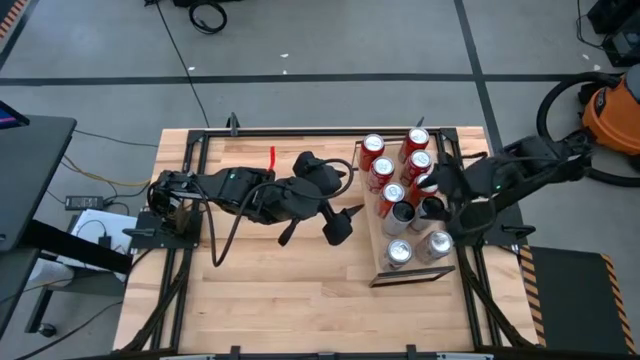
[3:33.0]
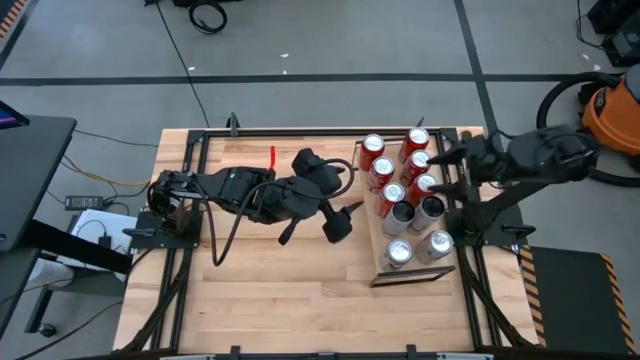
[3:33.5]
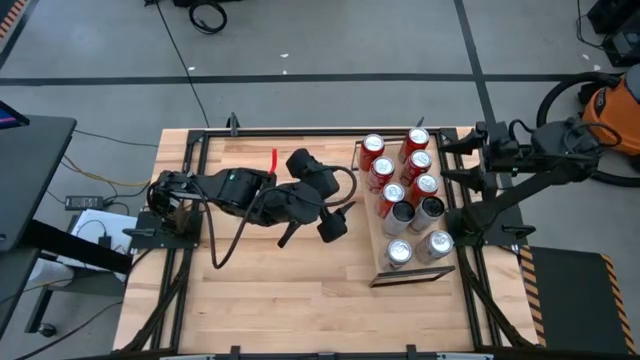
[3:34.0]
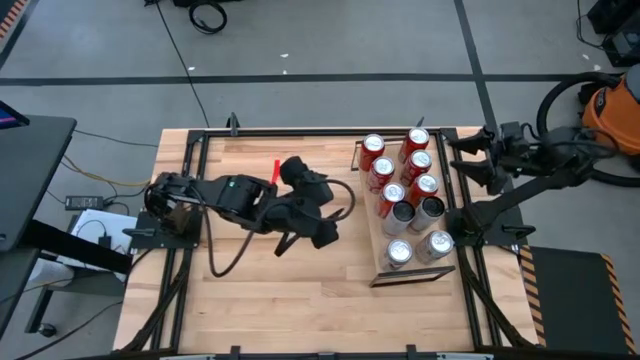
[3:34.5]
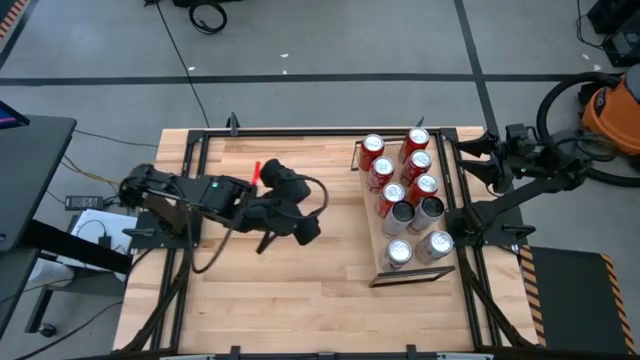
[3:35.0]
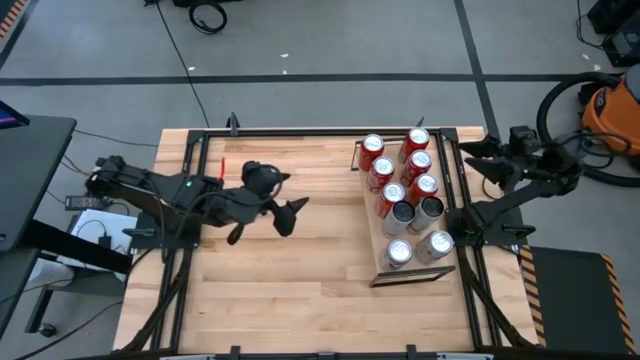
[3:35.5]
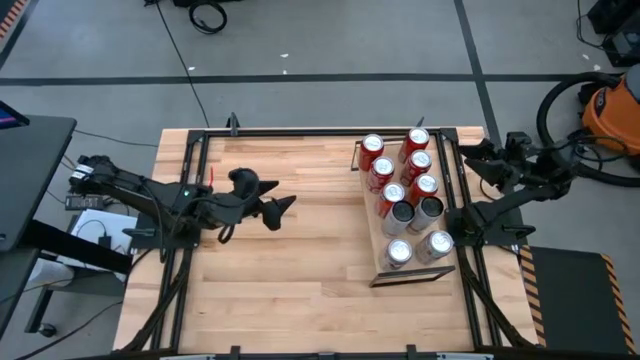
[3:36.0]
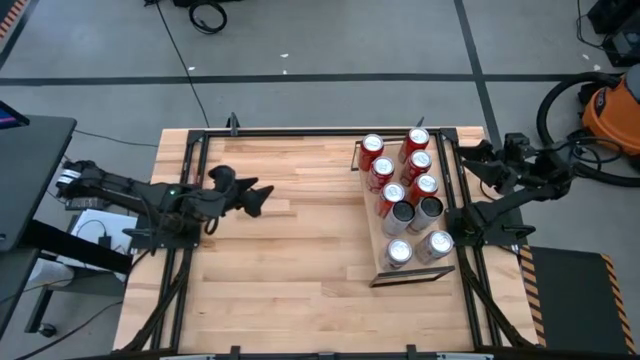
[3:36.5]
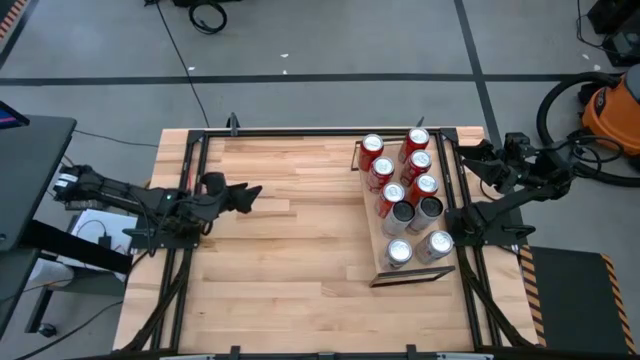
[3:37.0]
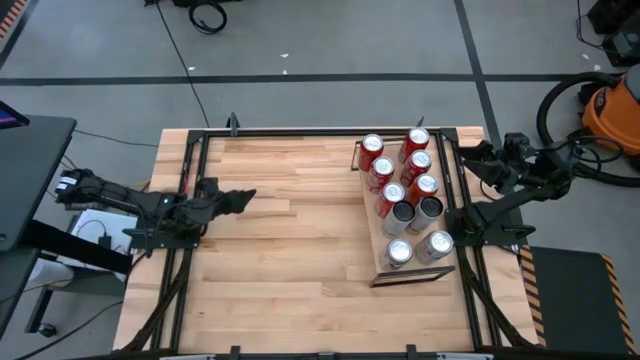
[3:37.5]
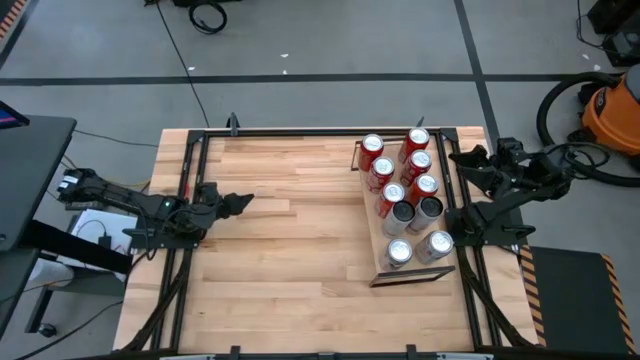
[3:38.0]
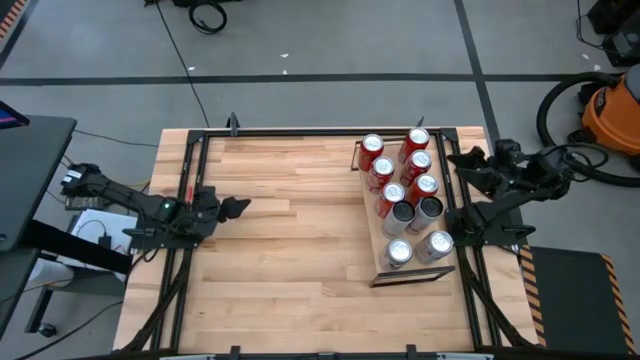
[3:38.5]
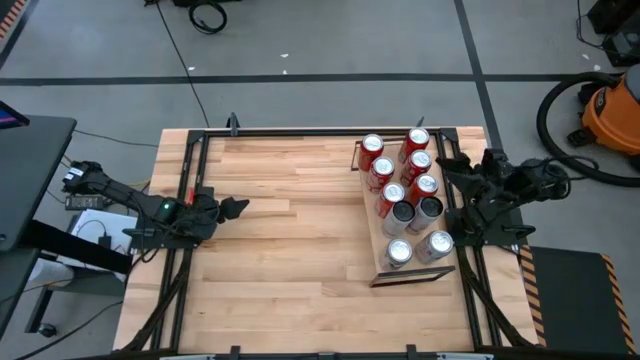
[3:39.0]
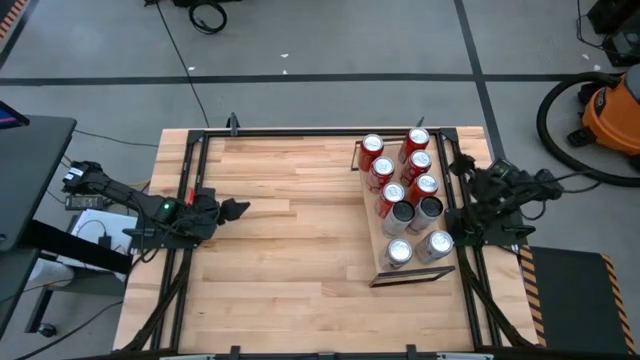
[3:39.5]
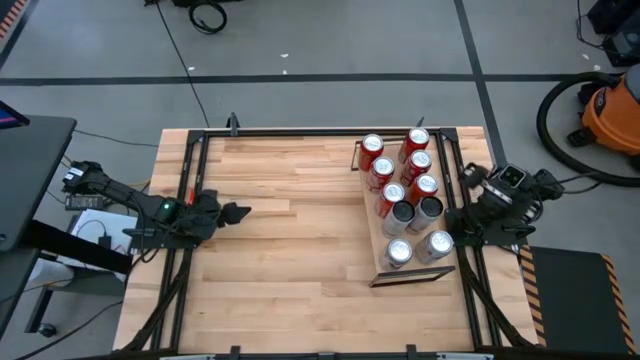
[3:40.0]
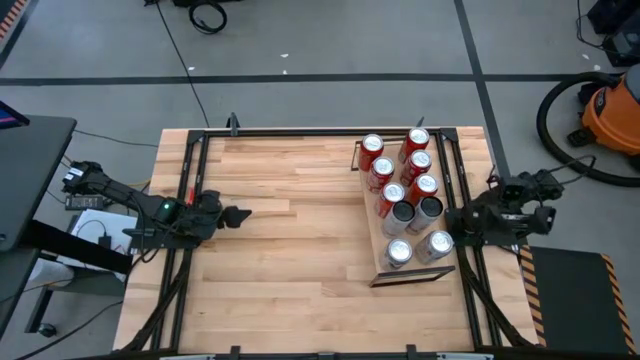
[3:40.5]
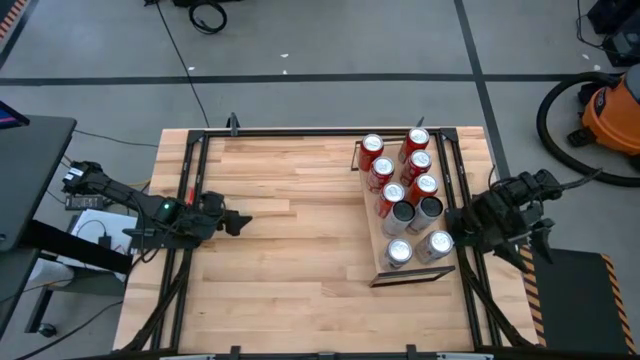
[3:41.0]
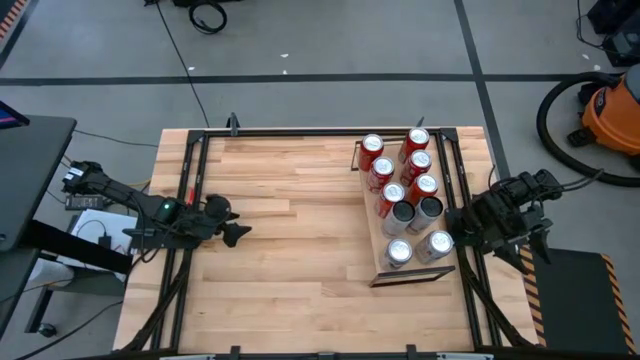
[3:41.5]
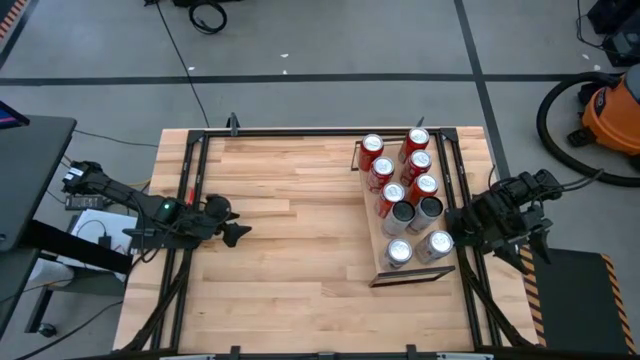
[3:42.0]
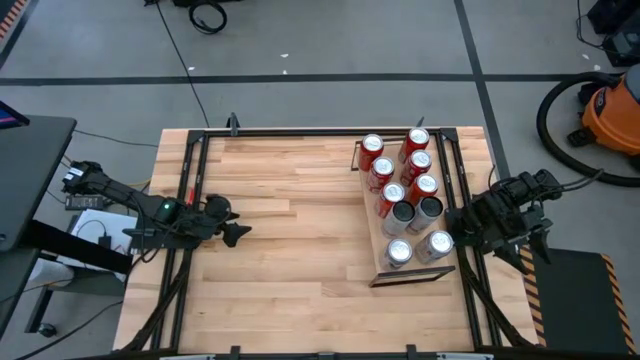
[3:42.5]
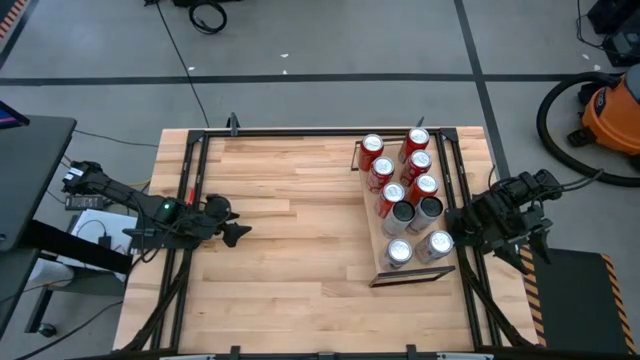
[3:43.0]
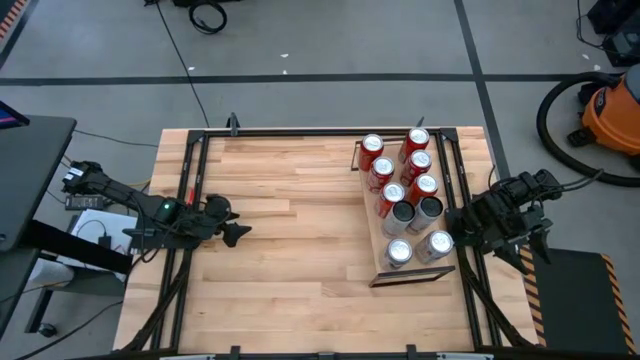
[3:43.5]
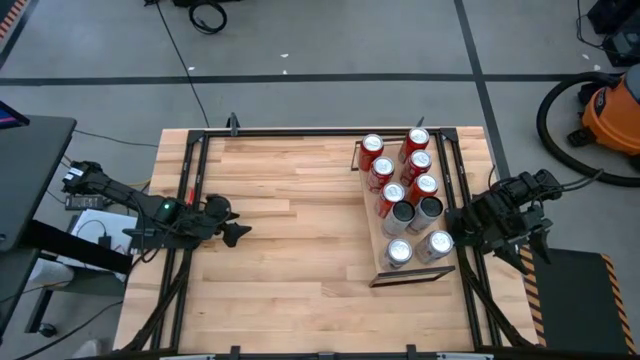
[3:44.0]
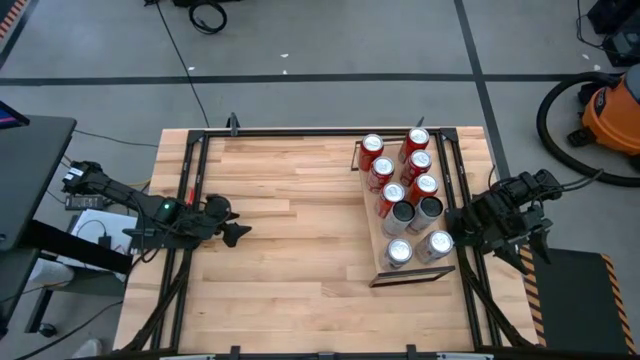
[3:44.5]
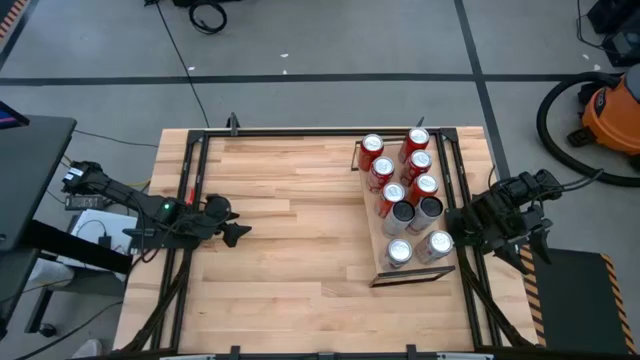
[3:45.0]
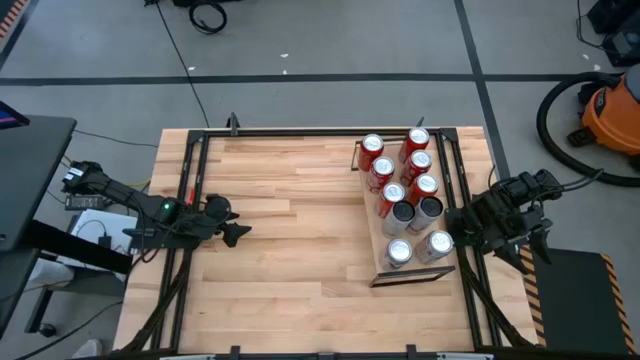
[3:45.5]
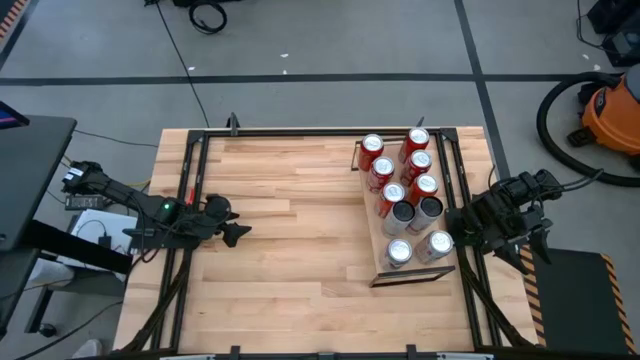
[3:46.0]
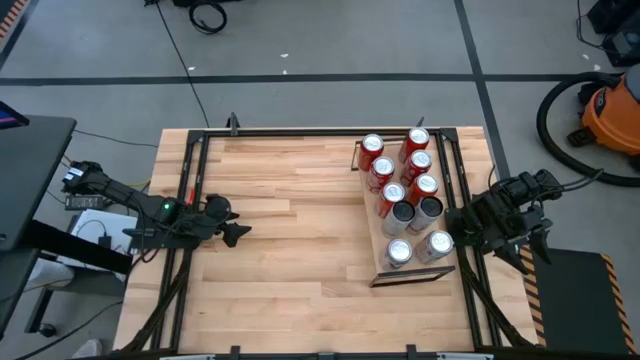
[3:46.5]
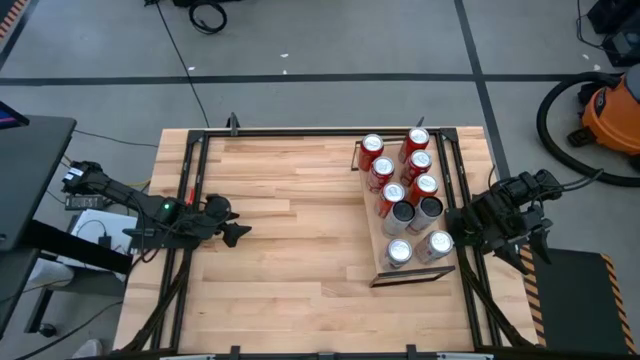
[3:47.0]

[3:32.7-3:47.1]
Task: Place canned beverage on shelf
Return to Home Position

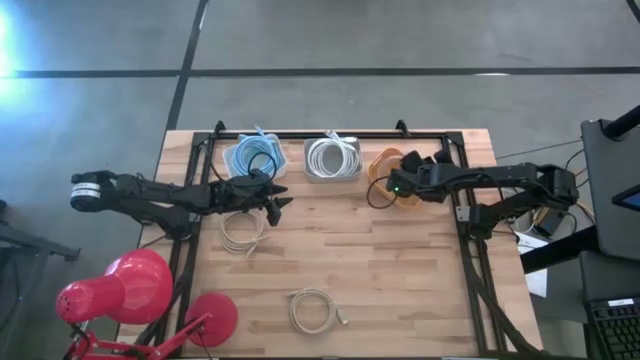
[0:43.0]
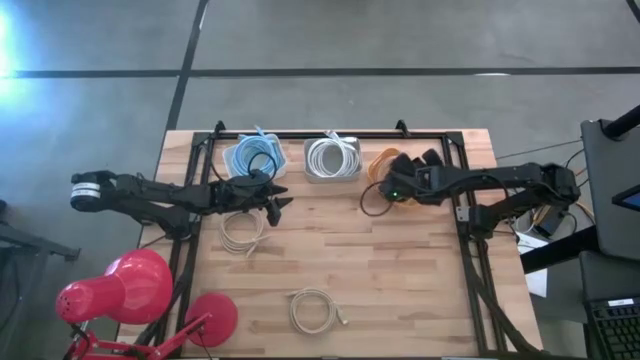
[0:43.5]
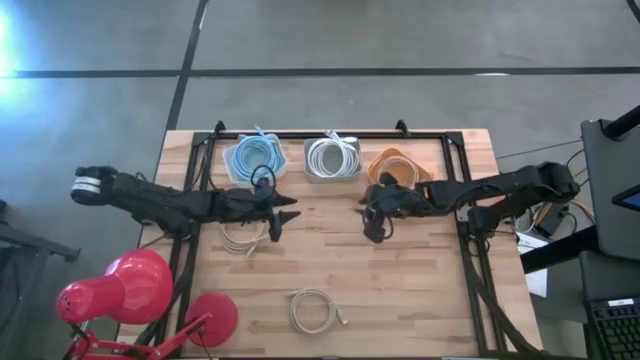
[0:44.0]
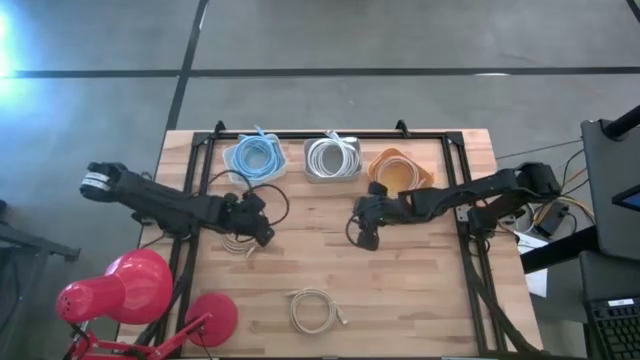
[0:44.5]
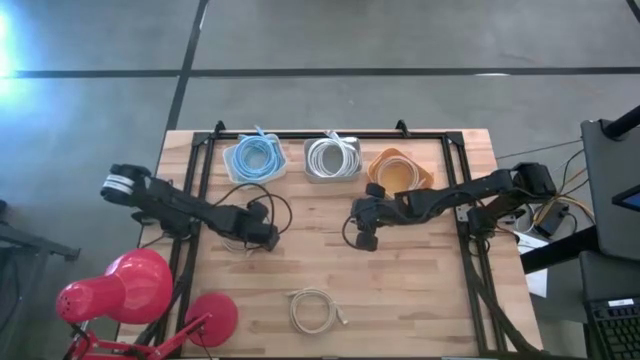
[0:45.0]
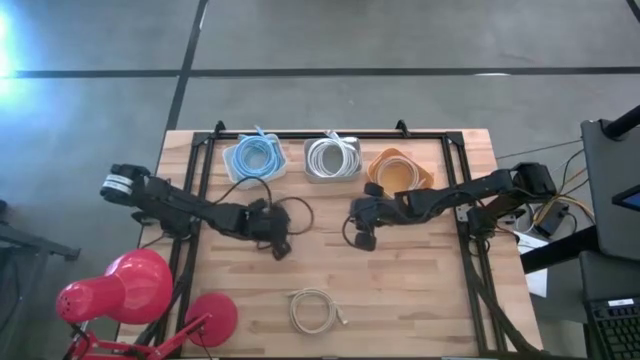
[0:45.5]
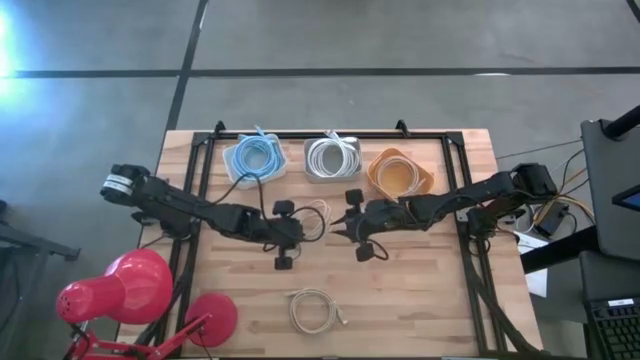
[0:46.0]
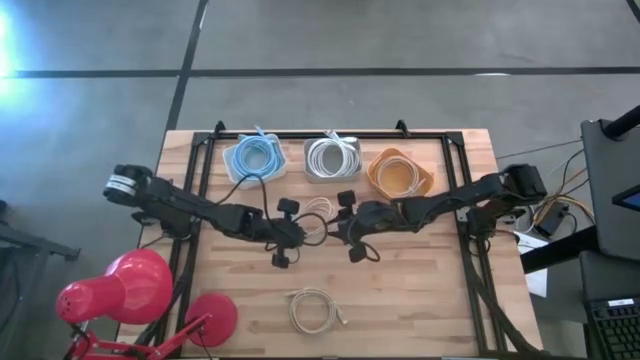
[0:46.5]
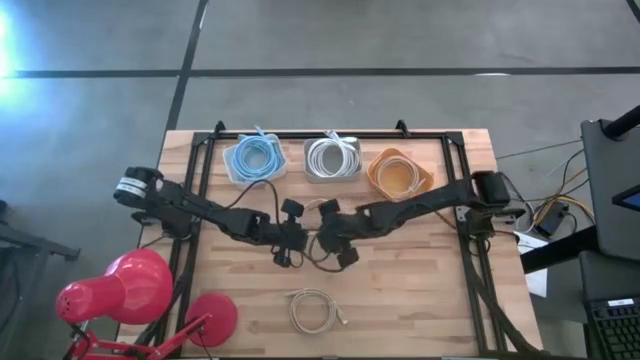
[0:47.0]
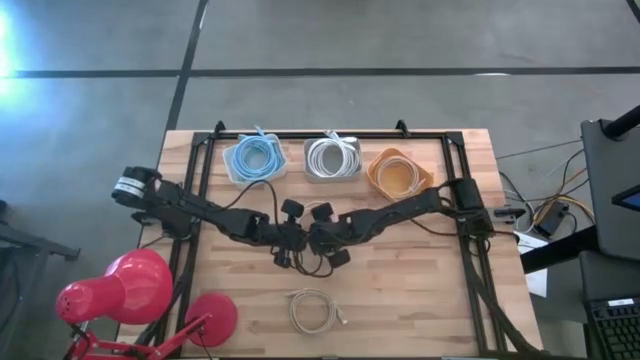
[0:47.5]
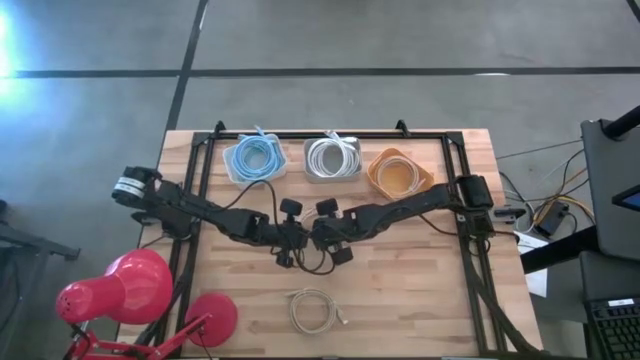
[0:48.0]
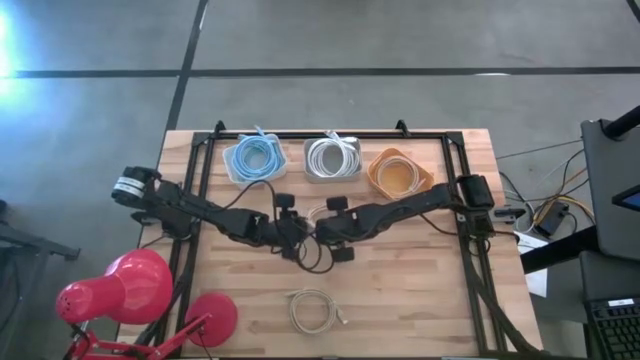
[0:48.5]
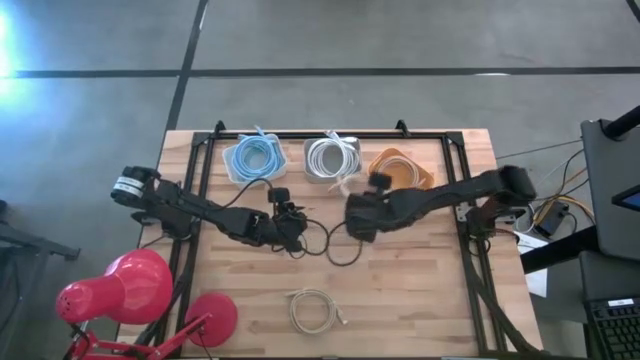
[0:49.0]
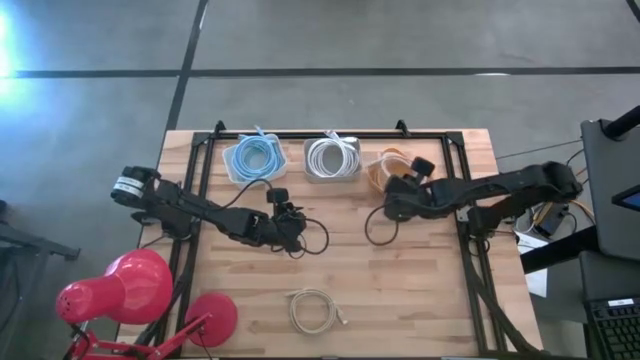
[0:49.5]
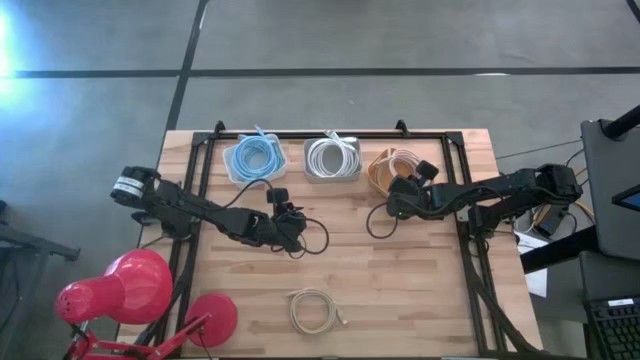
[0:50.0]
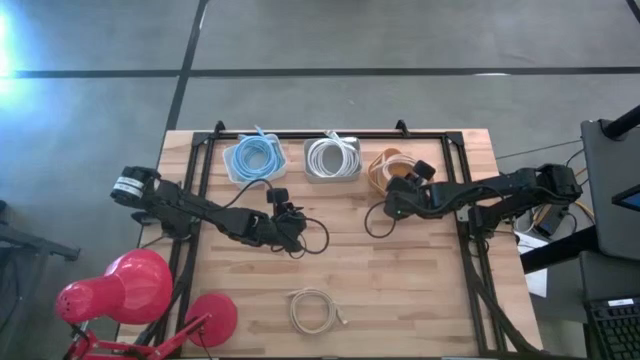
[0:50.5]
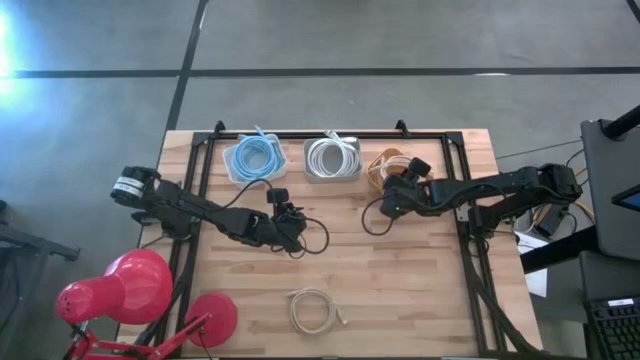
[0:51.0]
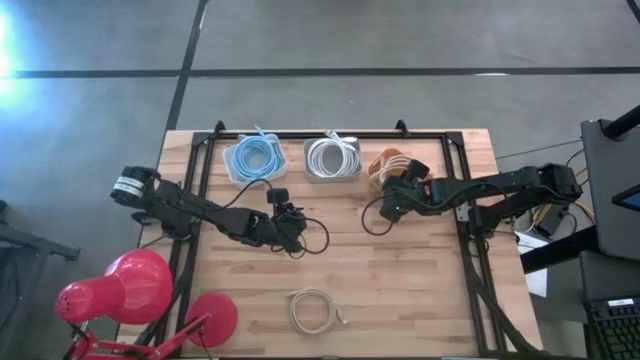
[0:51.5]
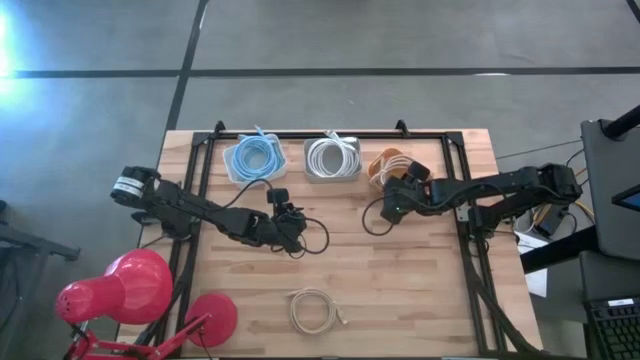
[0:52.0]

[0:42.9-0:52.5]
Task: Pick & Place USB Port
Put the top brown cable into the yellow bin
